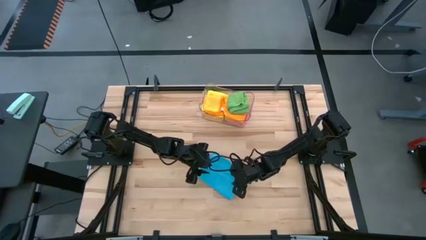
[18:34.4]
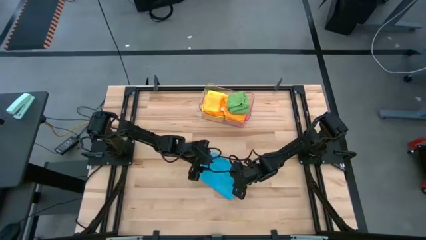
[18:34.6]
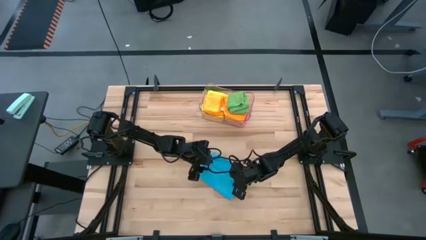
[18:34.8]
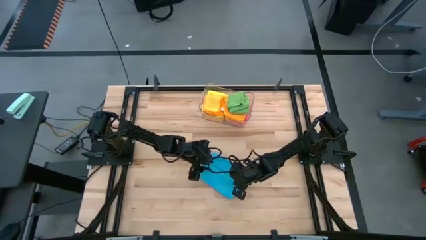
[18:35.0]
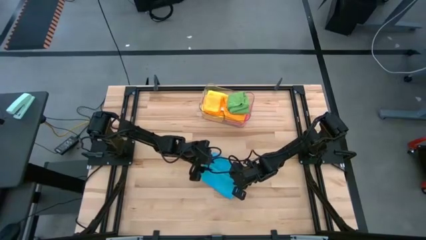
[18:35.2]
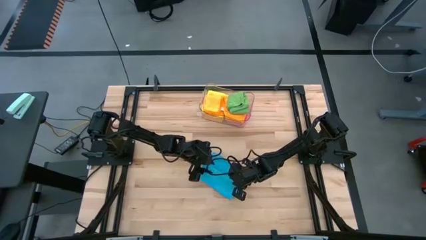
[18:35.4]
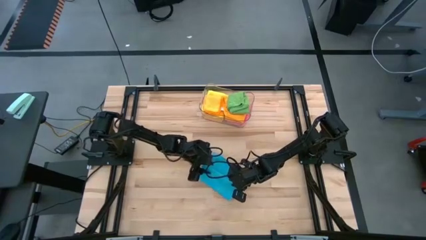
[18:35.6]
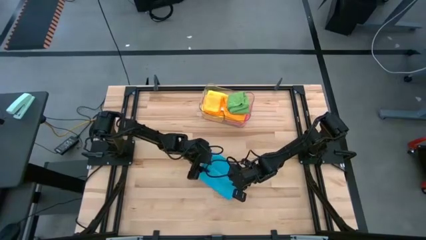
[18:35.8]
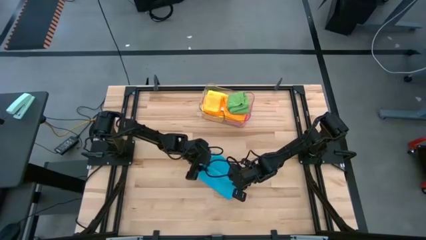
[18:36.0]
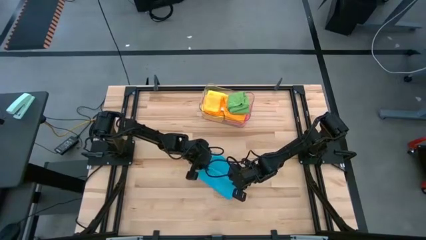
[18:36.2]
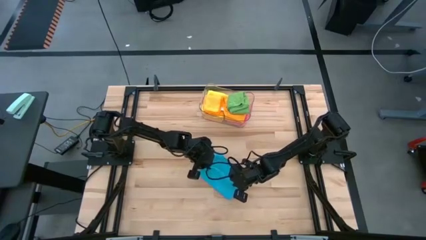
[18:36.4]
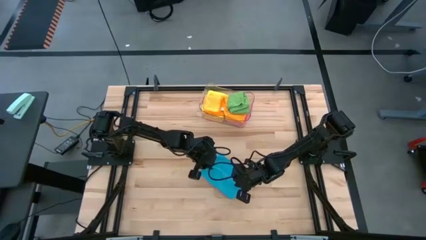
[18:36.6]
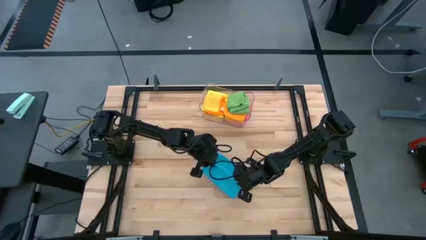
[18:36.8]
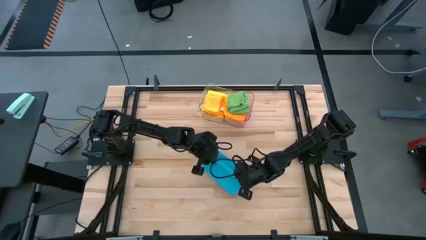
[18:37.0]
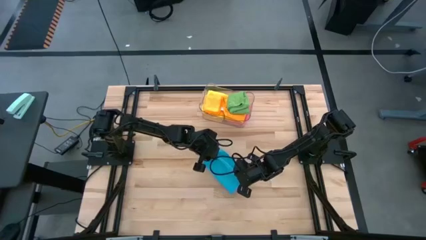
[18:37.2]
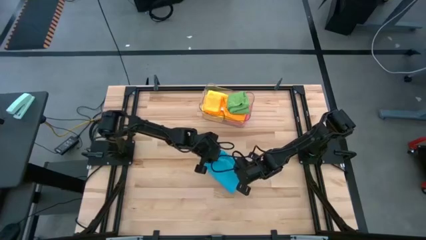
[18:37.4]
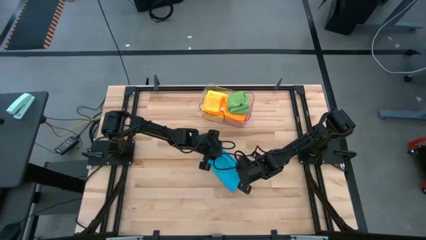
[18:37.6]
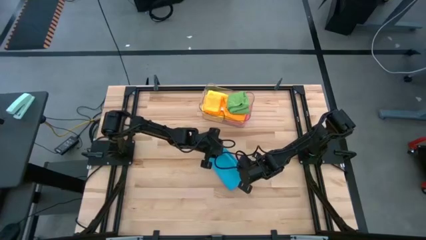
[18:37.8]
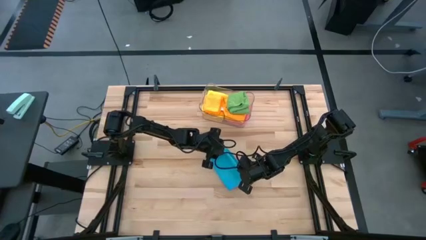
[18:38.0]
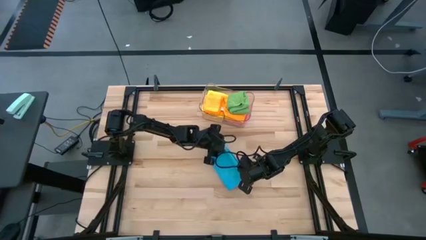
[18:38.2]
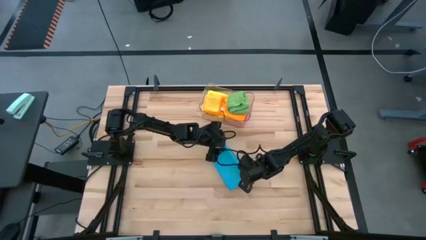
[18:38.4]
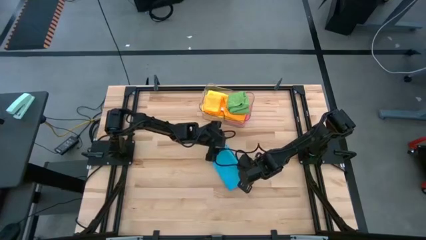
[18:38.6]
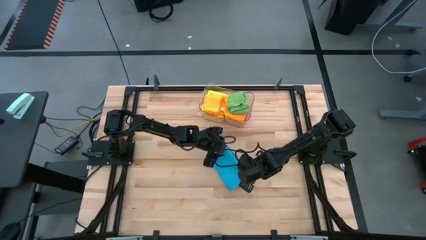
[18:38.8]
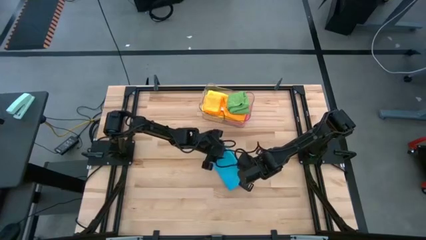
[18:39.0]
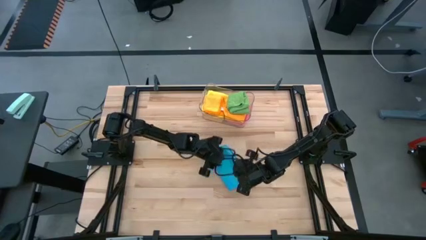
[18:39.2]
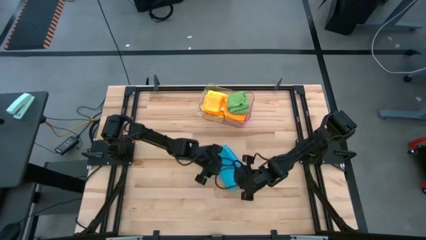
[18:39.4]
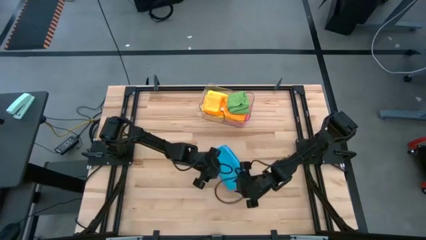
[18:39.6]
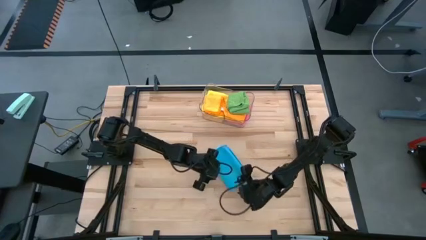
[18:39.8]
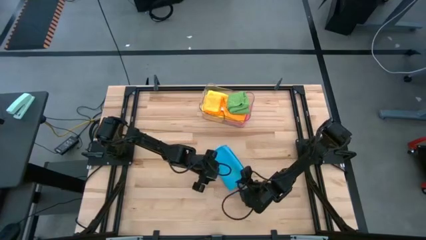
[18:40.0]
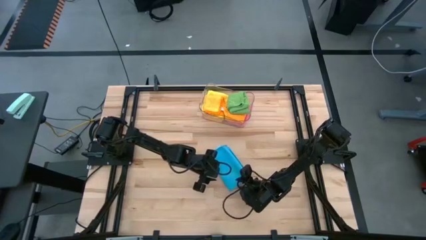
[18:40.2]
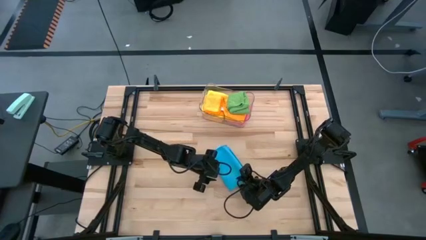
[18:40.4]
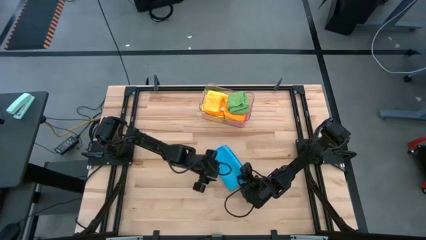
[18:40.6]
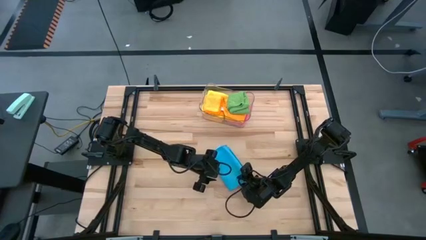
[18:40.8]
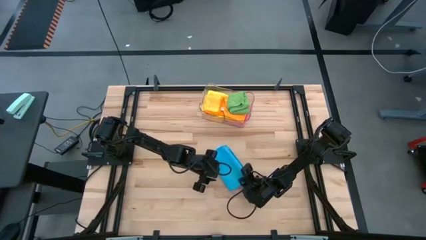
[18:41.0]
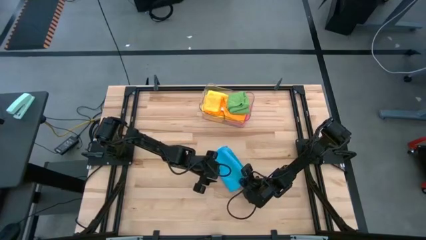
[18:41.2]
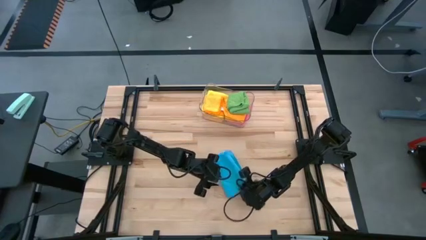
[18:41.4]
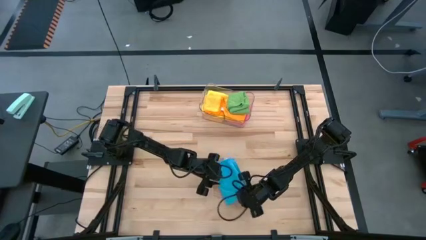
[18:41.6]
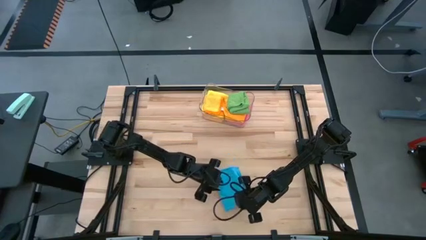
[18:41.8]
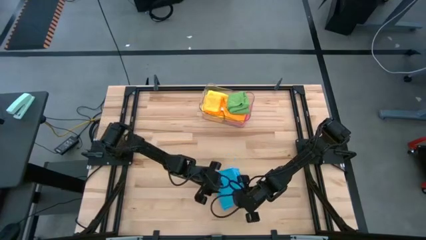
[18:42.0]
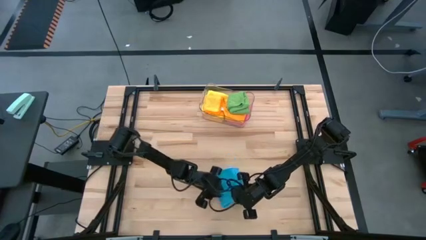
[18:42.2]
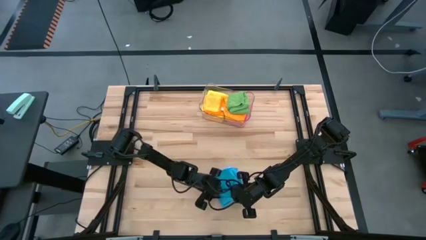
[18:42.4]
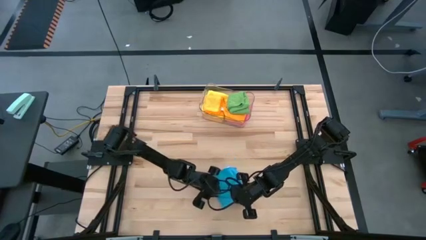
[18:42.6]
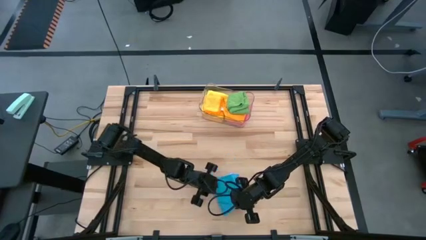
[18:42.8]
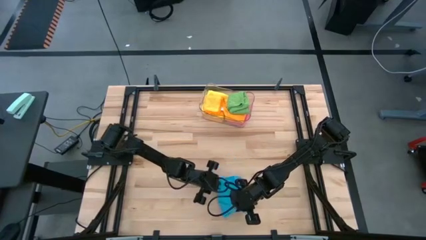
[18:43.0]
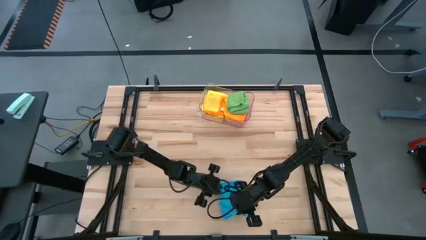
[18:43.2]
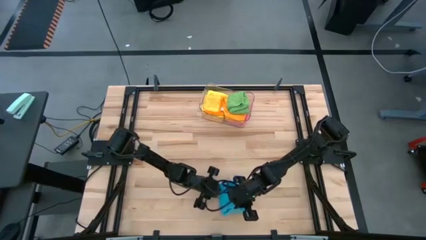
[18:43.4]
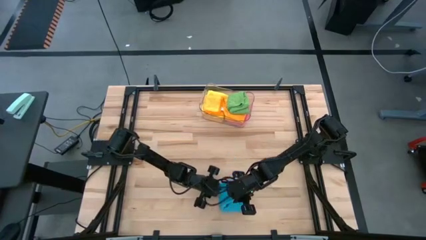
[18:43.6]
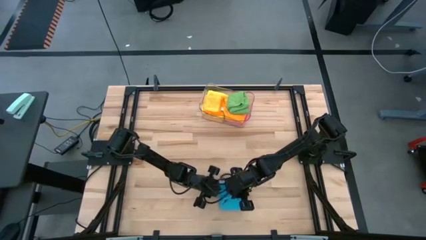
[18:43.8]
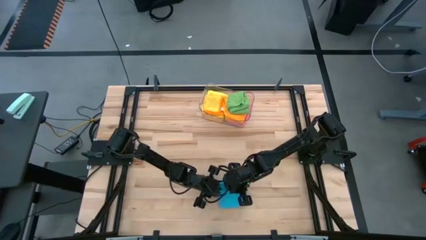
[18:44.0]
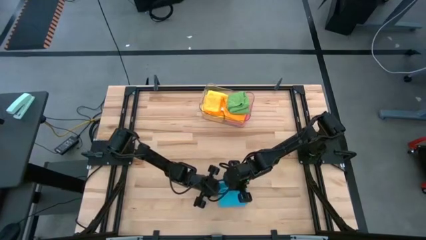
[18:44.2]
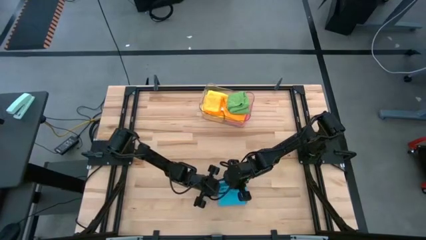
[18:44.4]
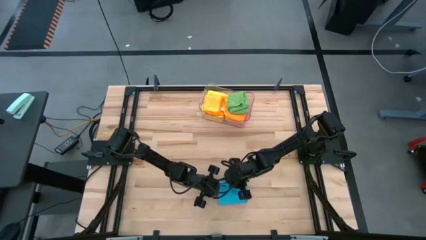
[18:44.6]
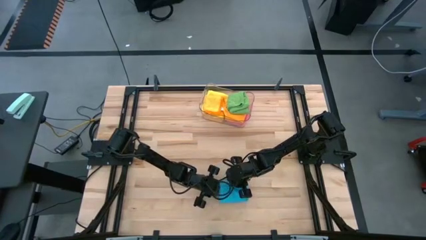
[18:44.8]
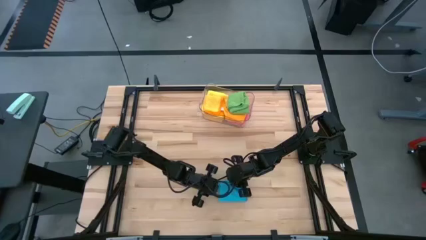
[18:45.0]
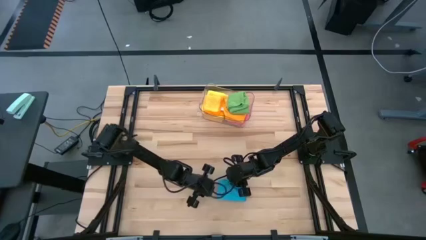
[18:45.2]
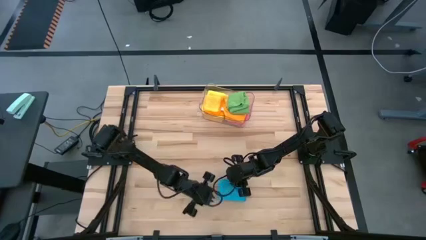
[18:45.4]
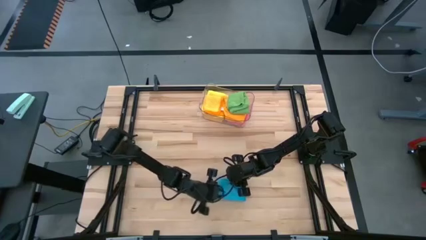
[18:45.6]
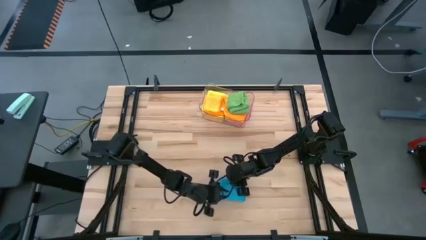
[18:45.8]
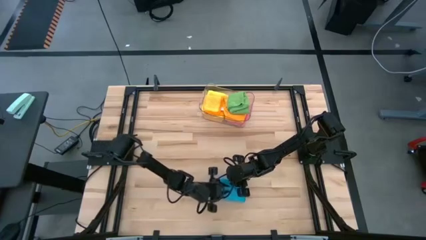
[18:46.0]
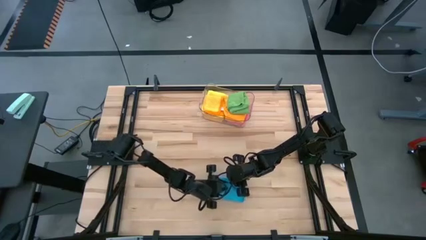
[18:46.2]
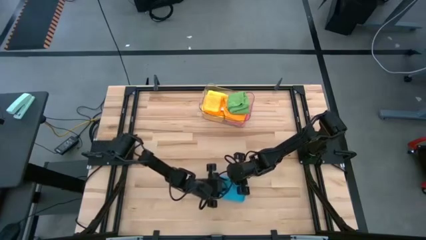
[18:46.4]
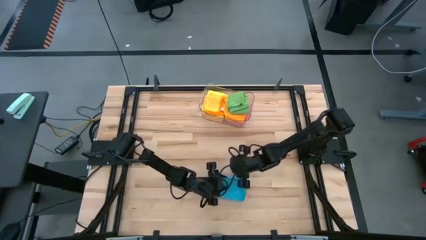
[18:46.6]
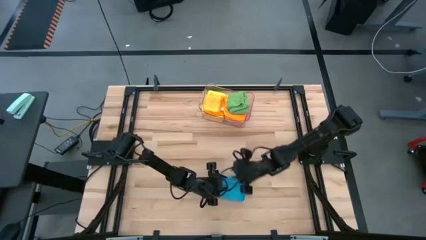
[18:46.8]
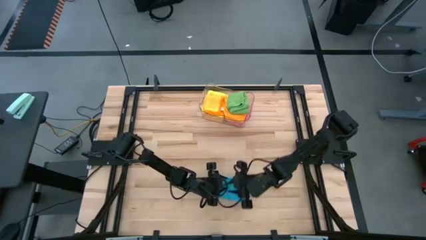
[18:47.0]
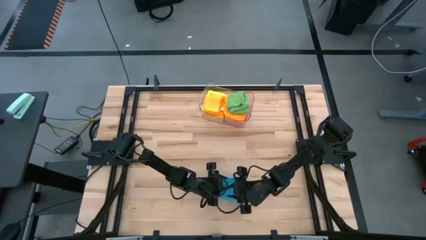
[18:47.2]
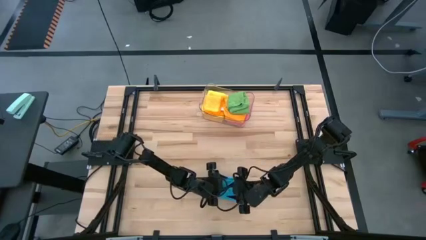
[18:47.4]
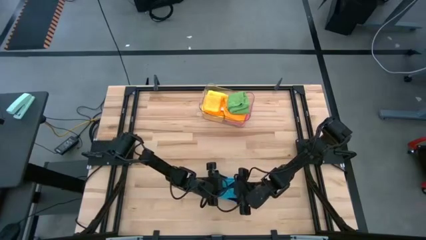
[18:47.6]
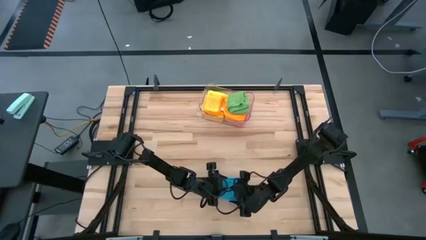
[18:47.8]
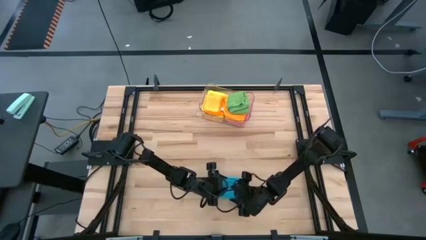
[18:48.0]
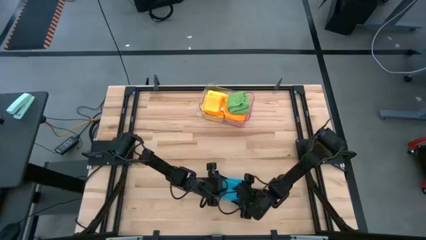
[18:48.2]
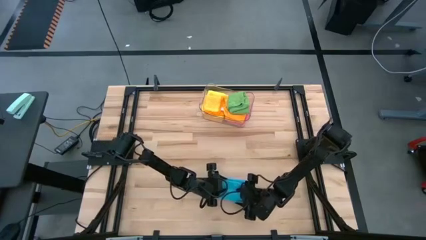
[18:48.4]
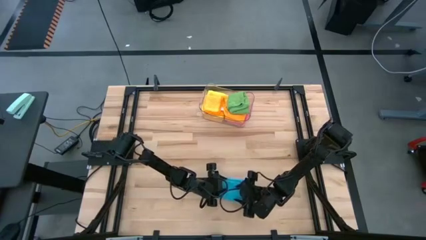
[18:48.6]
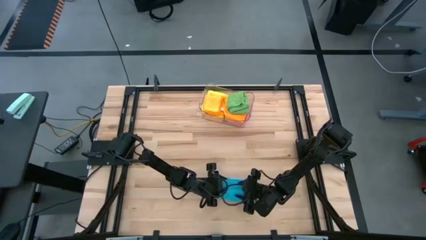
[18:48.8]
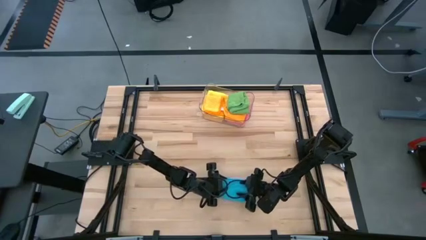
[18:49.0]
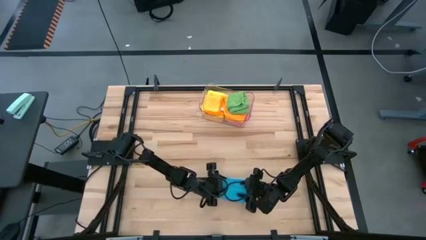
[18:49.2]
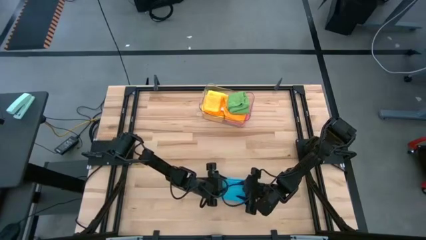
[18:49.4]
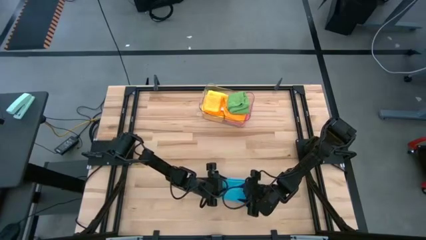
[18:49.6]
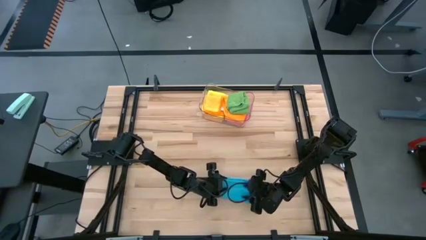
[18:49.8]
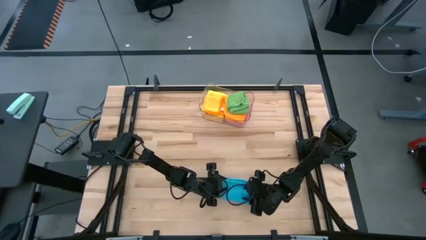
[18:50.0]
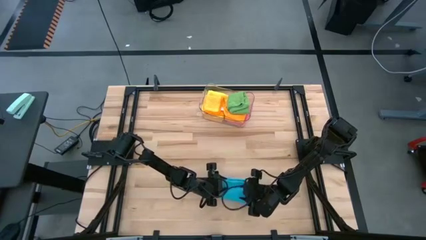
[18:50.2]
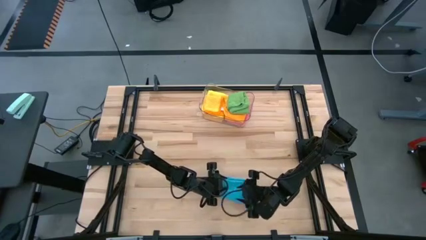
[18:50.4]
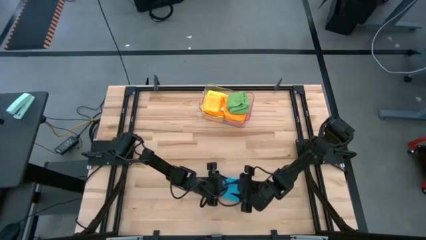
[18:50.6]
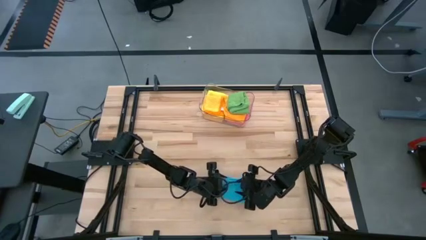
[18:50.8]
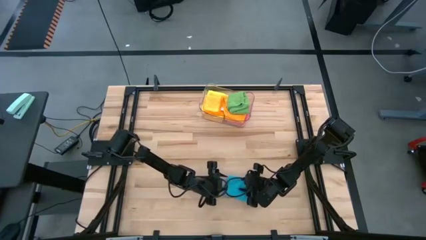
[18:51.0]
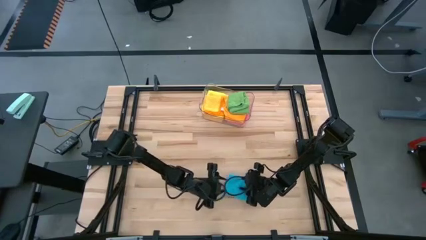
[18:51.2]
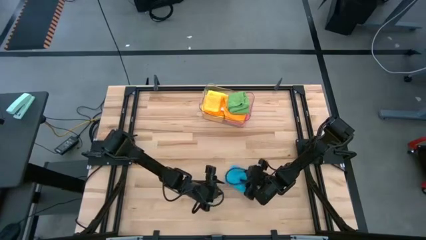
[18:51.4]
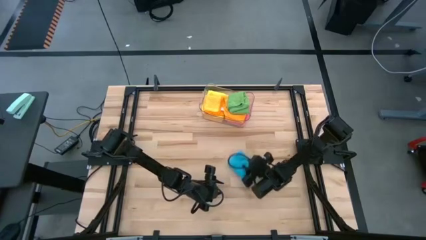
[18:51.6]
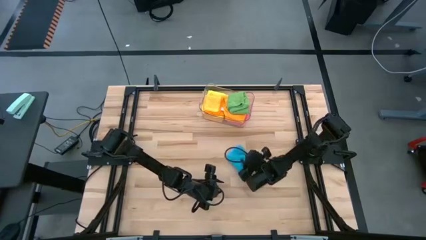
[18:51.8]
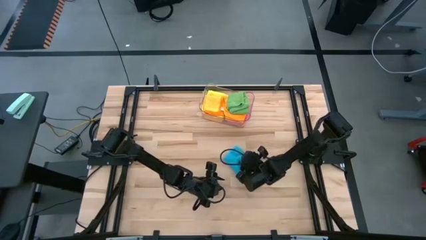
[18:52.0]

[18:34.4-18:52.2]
Task: Fold microfiber towels
Fold the blue microfiber cloth
